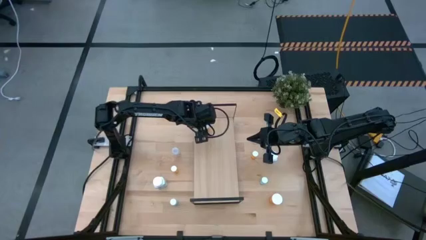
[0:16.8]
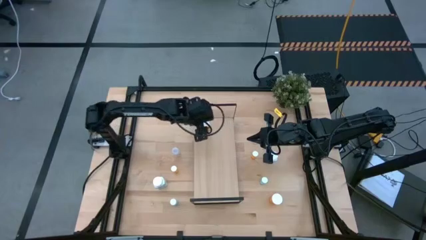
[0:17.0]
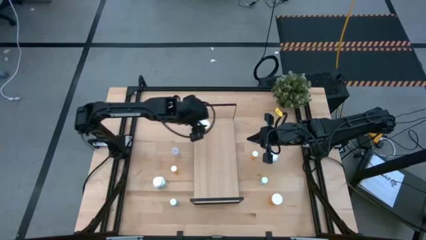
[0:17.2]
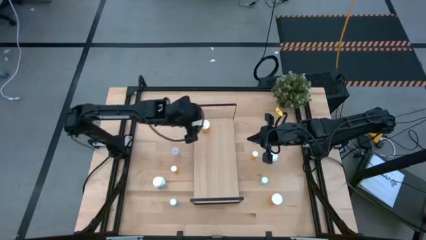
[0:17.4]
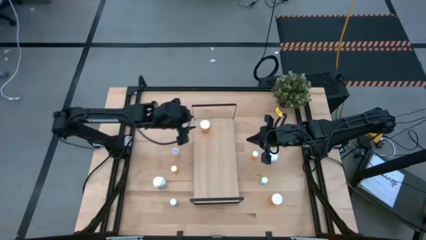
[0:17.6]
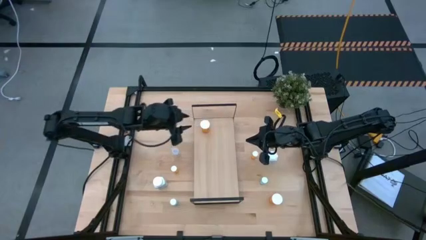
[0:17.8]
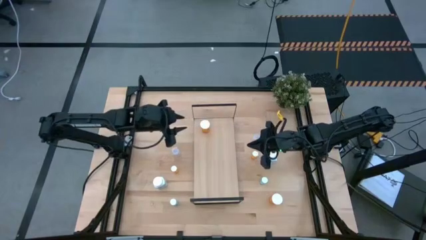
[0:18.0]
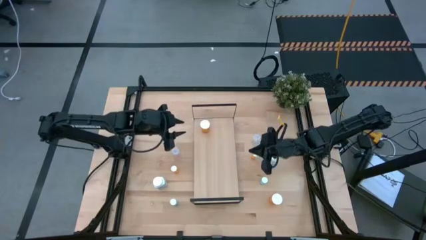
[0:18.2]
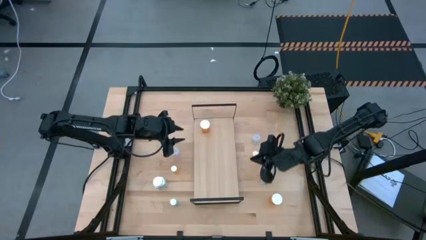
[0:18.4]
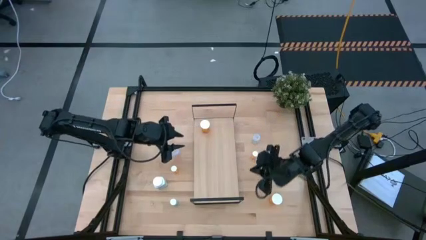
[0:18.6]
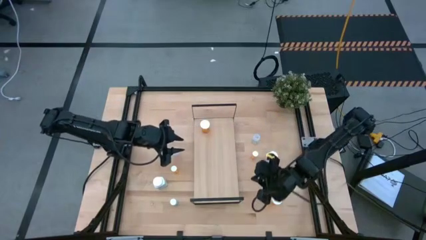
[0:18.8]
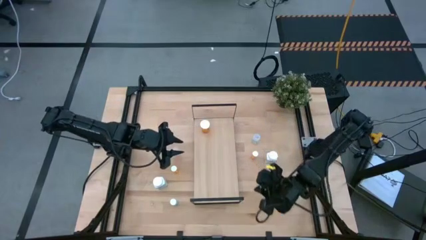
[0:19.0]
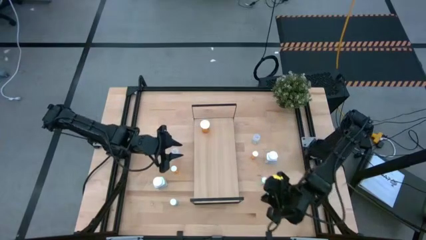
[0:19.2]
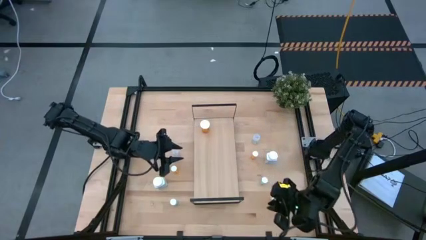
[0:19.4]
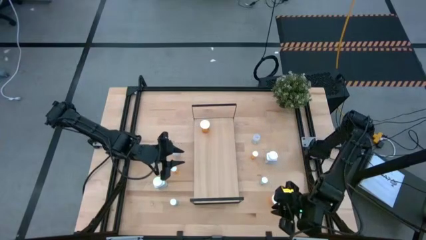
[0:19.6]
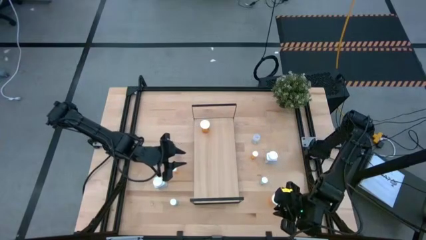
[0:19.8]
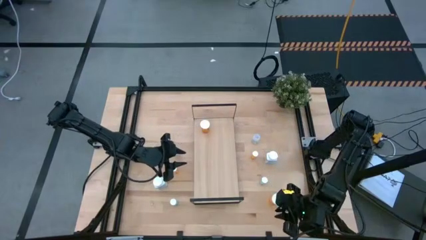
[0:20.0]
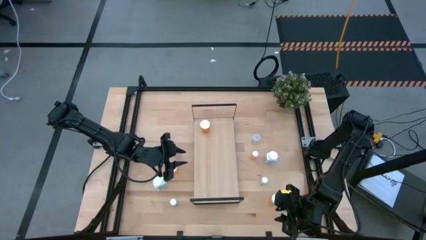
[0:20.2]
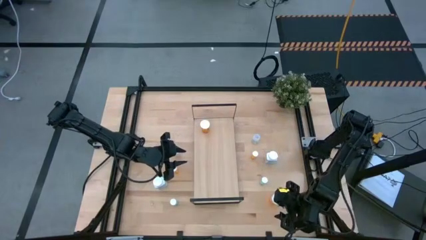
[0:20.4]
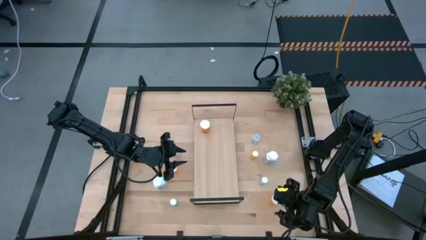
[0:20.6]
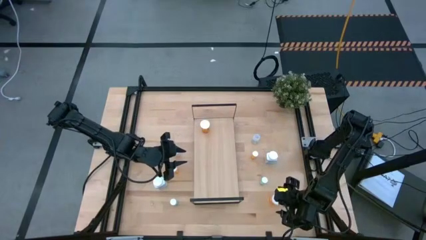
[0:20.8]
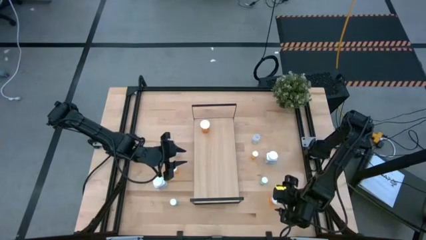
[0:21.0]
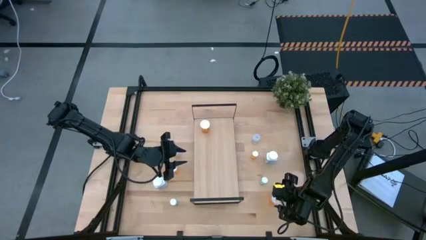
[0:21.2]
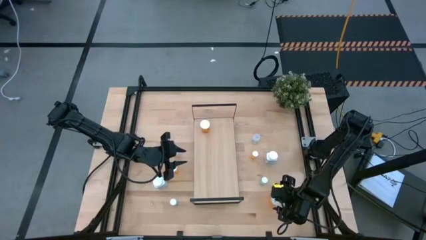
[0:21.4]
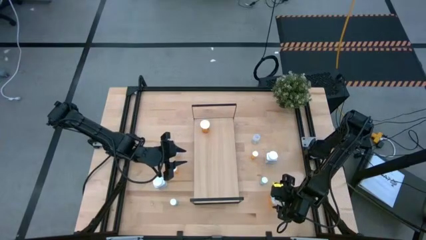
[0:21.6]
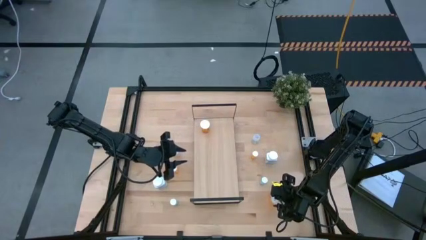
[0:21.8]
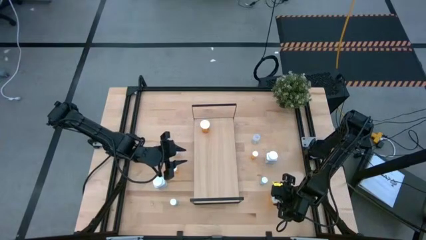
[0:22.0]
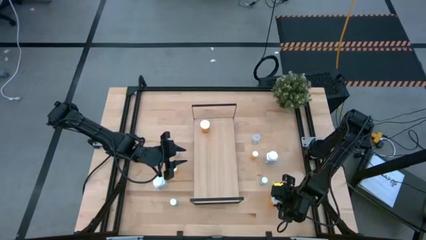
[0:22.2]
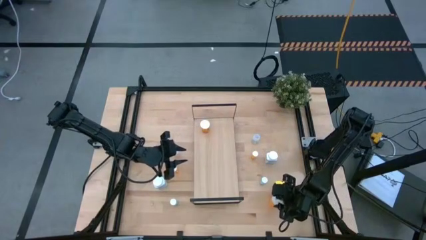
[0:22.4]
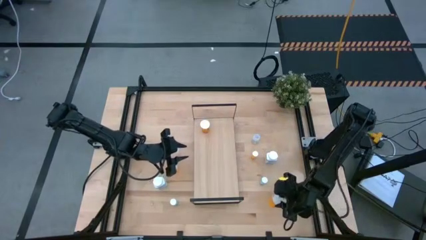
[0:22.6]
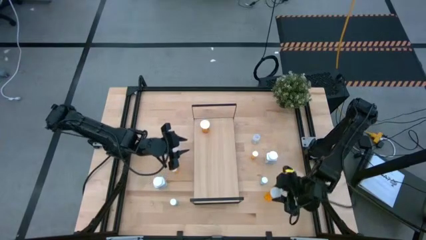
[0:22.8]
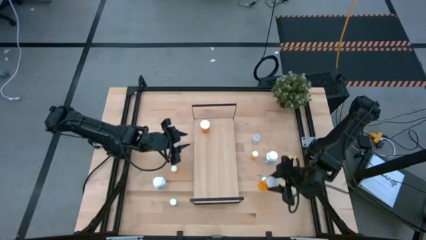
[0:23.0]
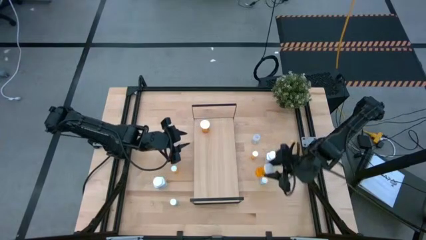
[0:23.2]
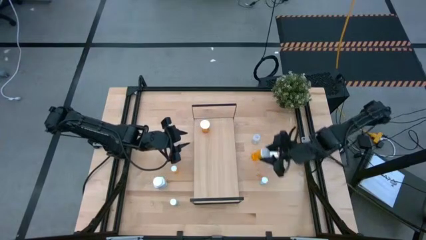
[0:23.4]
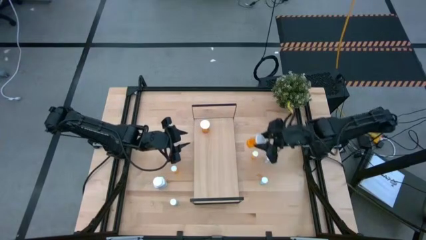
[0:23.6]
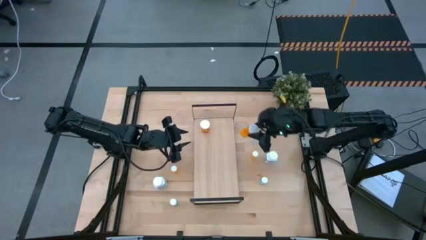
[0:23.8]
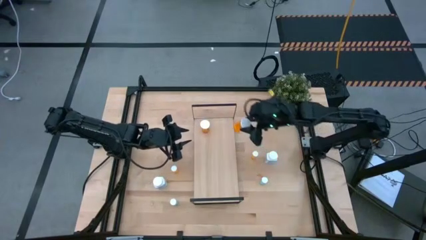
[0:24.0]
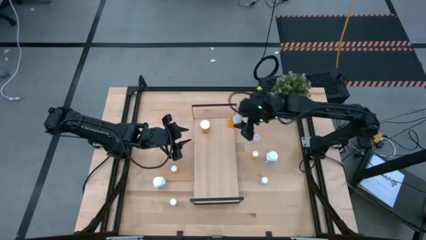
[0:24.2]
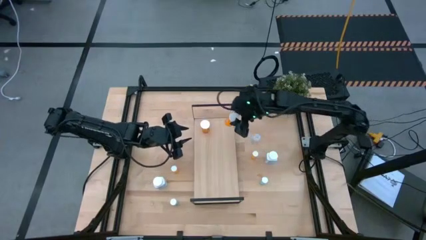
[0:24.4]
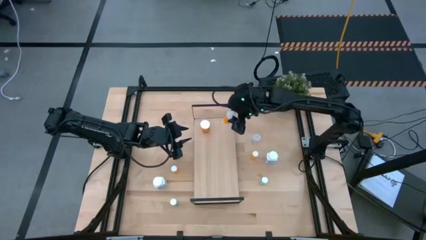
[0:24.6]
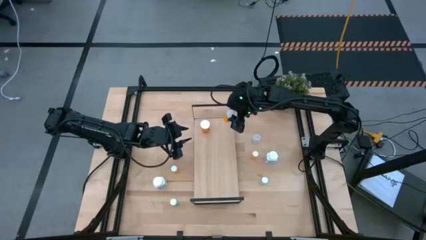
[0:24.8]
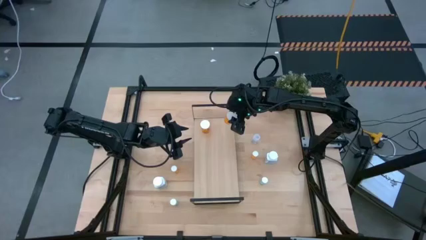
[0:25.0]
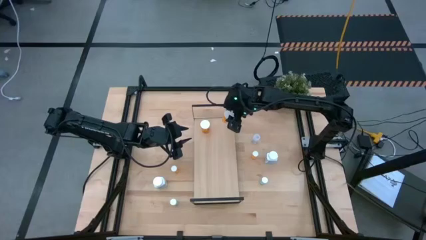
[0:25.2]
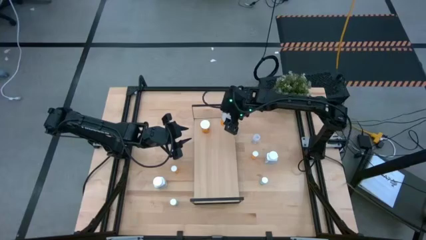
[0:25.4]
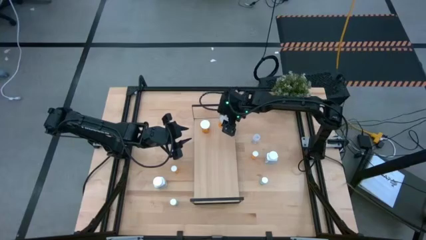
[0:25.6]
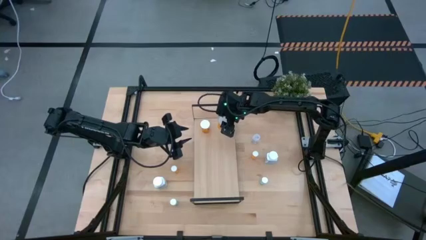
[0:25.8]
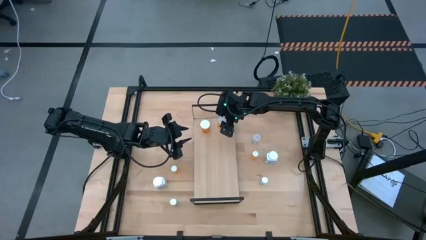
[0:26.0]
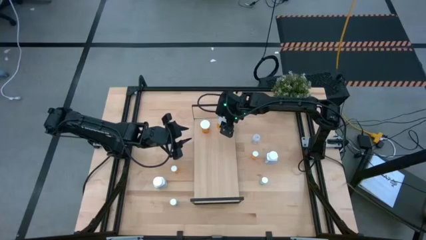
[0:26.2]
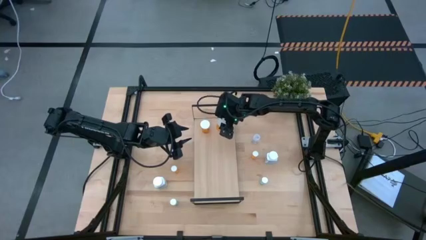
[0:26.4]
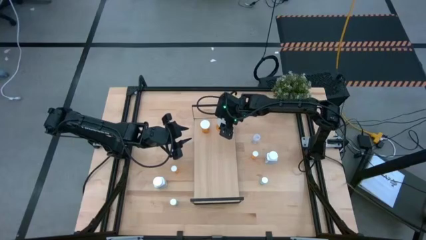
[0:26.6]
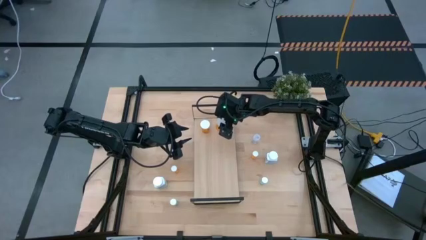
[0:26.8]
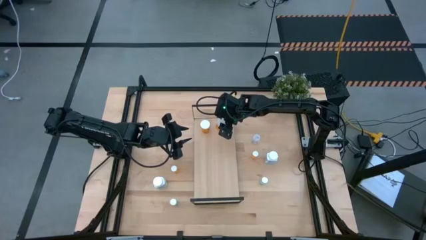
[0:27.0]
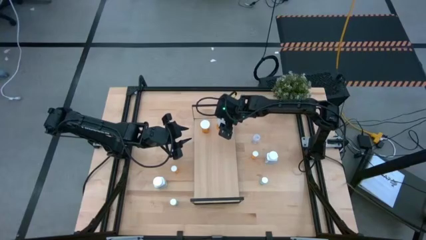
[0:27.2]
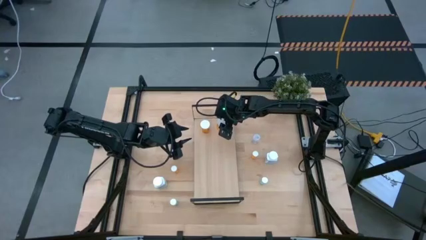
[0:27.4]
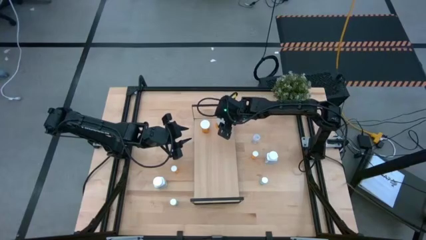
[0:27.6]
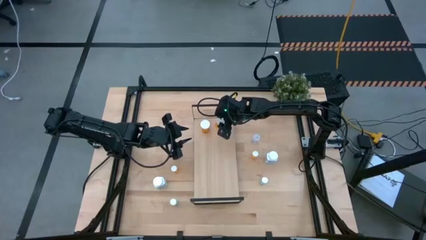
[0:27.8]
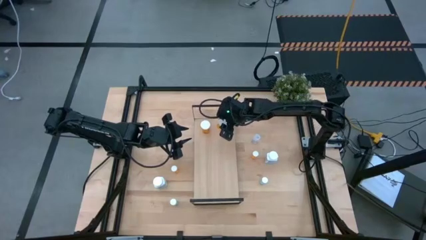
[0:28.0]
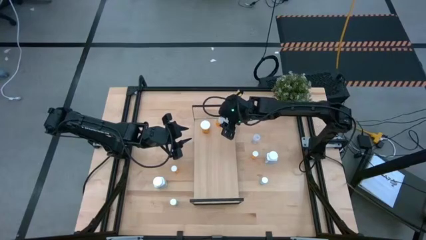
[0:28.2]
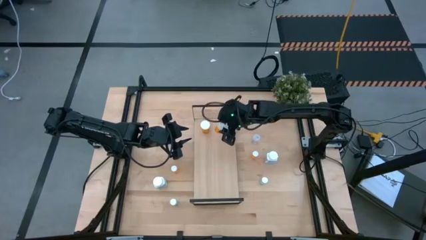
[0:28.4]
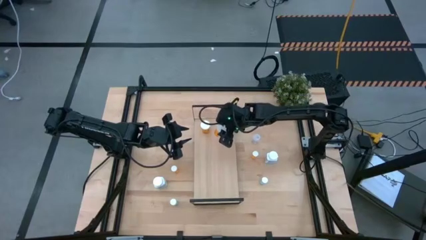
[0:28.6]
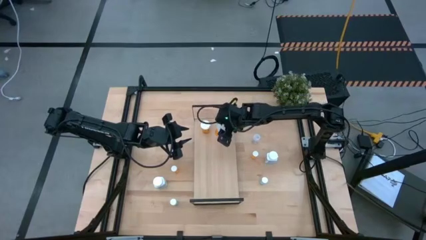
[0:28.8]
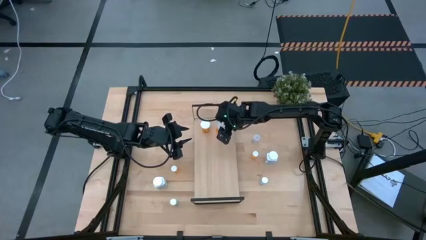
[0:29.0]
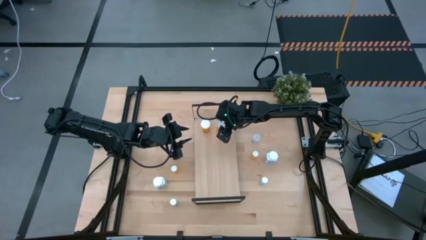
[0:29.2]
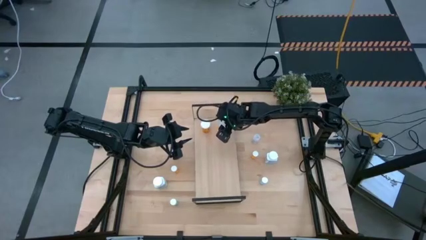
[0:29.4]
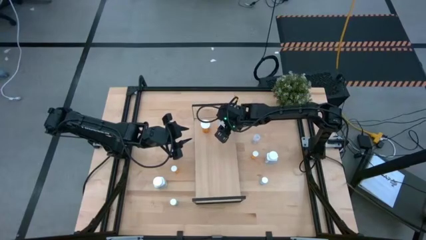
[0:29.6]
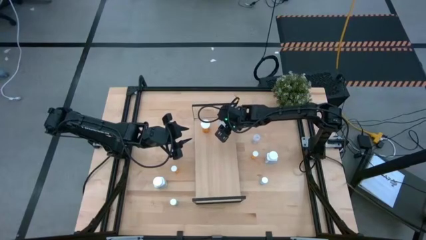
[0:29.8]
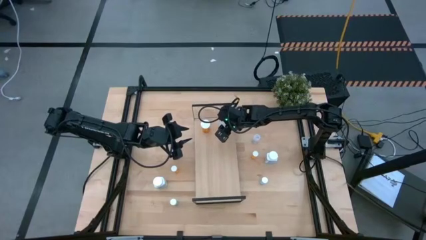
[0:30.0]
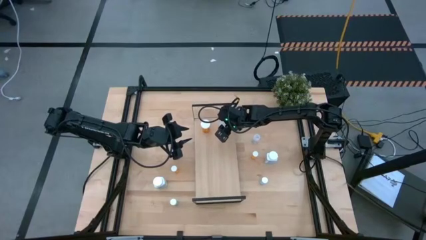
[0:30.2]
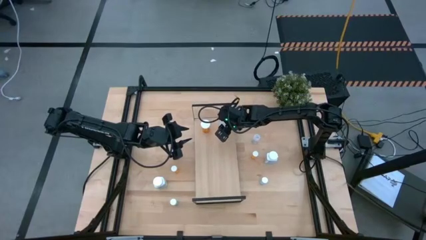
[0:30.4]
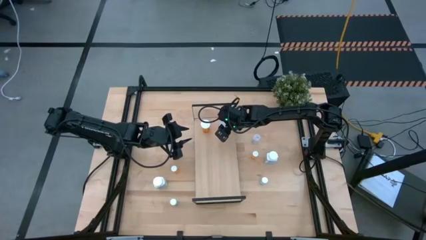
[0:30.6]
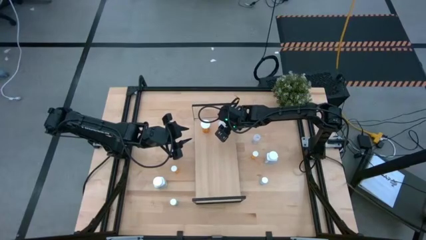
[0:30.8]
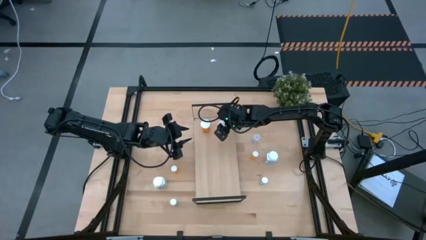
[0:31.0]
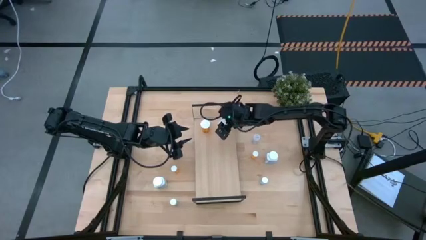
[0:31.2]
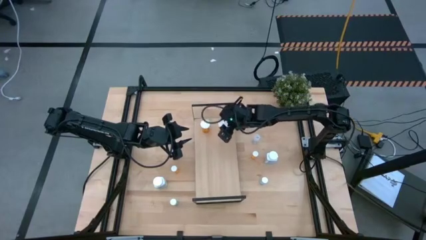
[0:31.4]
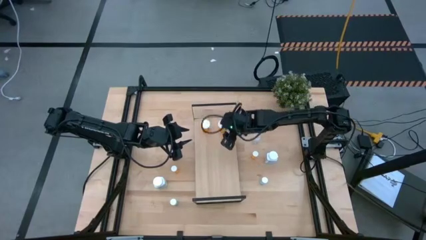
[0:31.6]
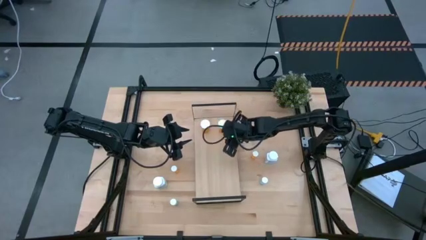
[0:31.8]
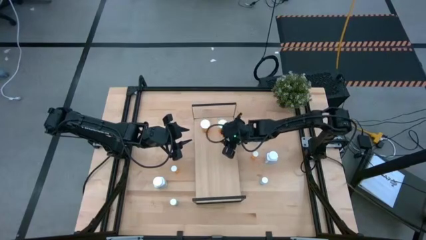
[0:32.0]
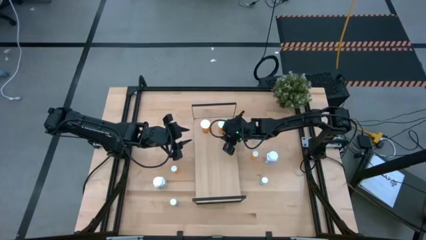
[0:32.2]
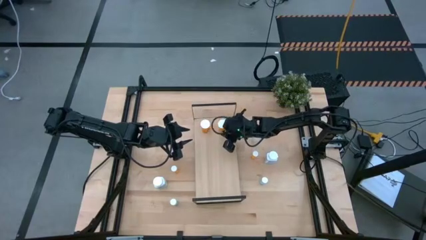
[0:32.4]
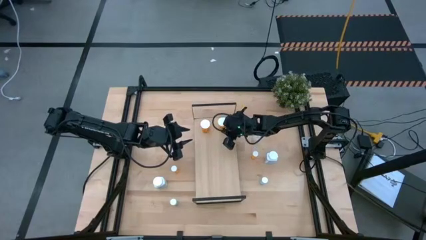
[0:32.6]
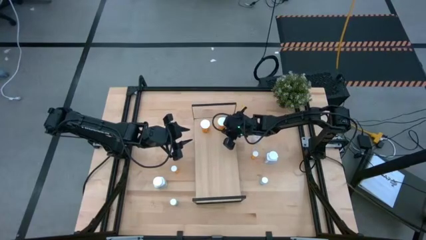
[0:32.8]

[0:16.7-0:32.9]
Task: Pick and place medicine bottles onto shelf by color
Put the big orange medicine bottle on the shelf
